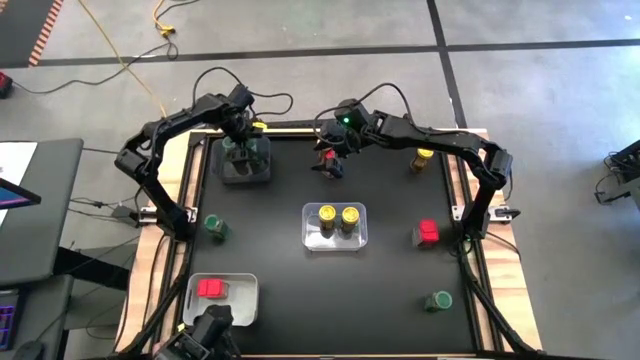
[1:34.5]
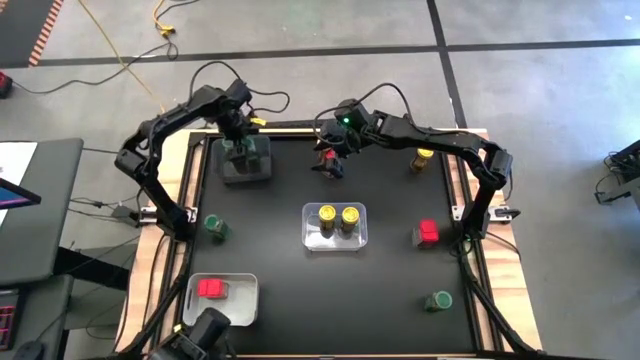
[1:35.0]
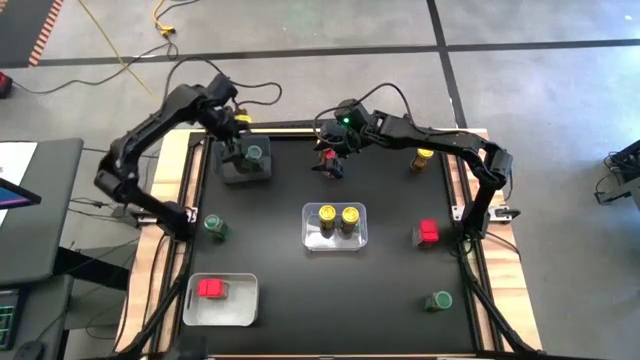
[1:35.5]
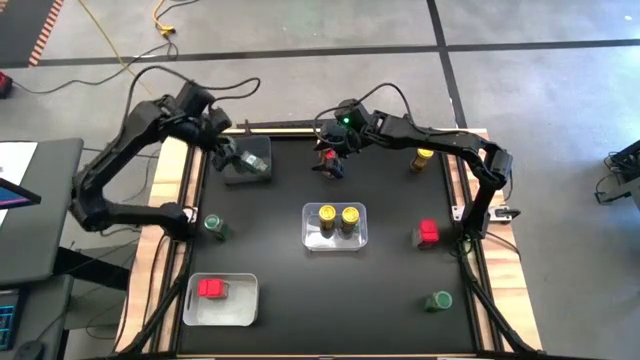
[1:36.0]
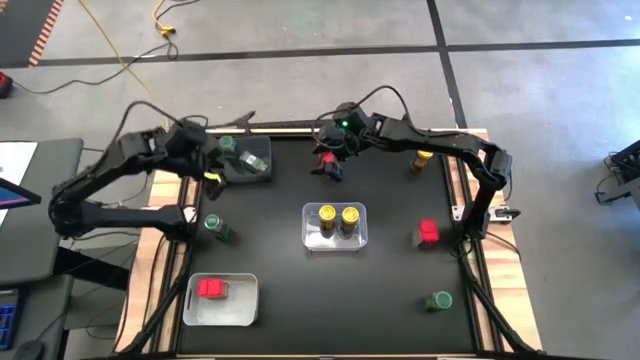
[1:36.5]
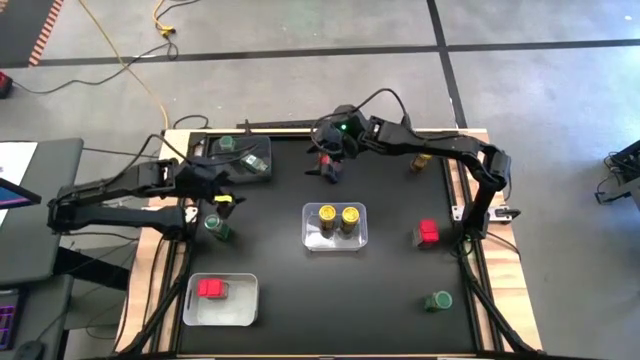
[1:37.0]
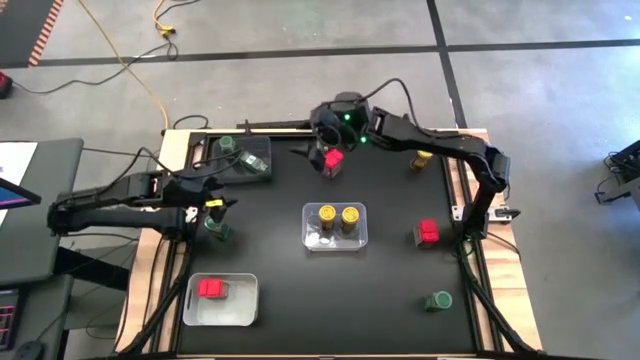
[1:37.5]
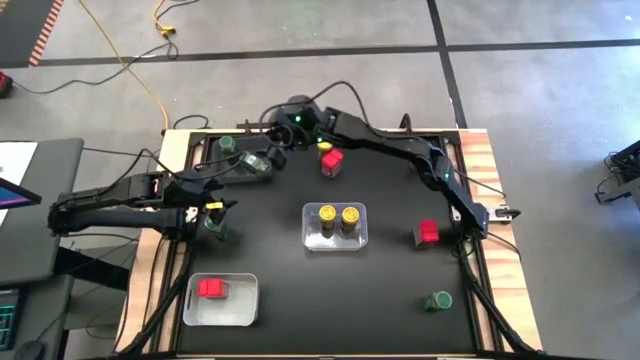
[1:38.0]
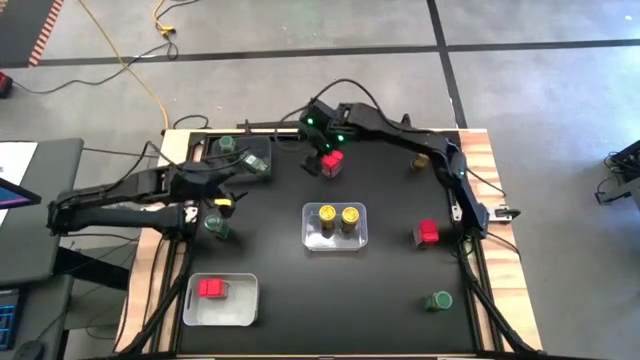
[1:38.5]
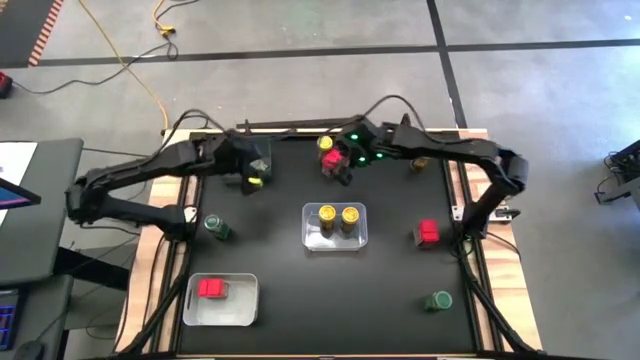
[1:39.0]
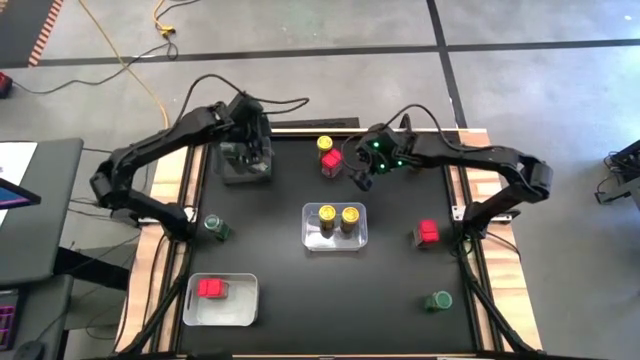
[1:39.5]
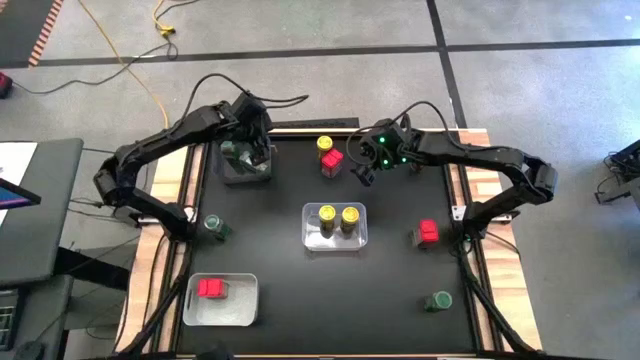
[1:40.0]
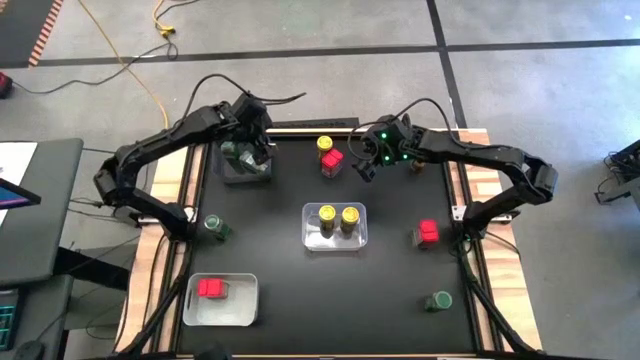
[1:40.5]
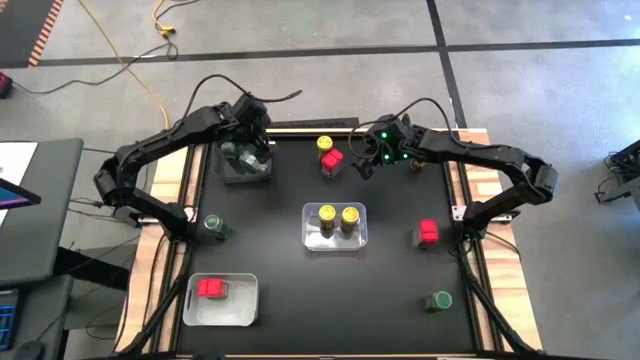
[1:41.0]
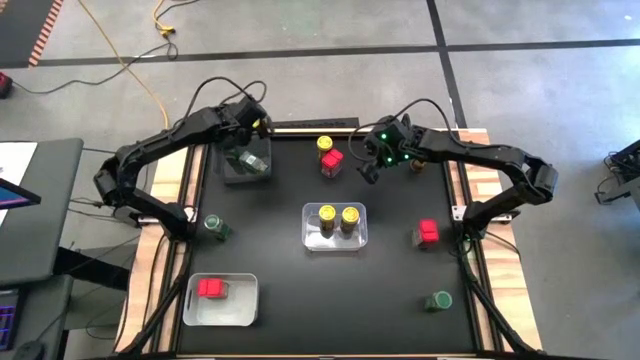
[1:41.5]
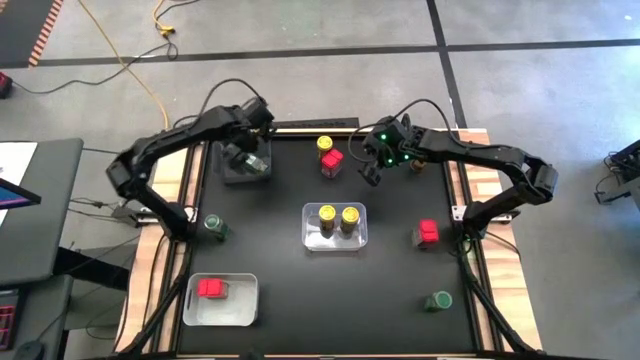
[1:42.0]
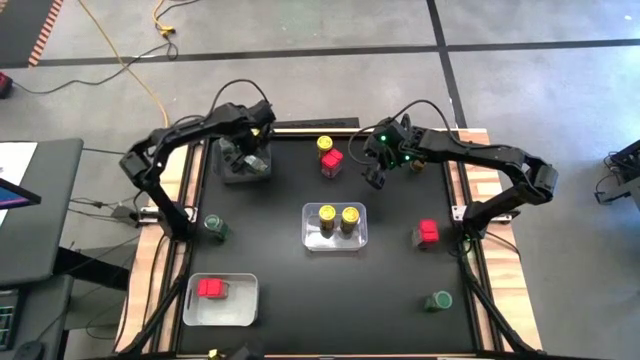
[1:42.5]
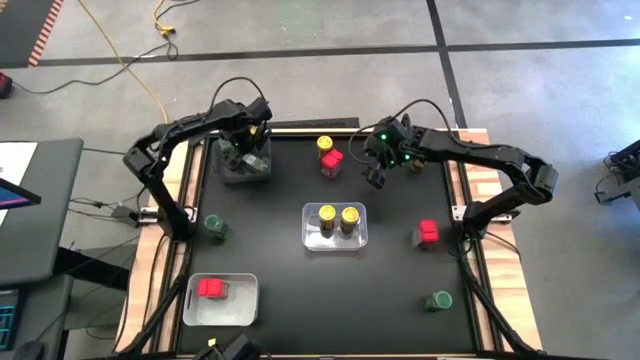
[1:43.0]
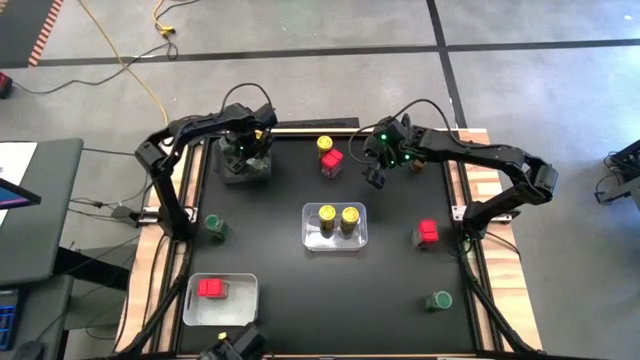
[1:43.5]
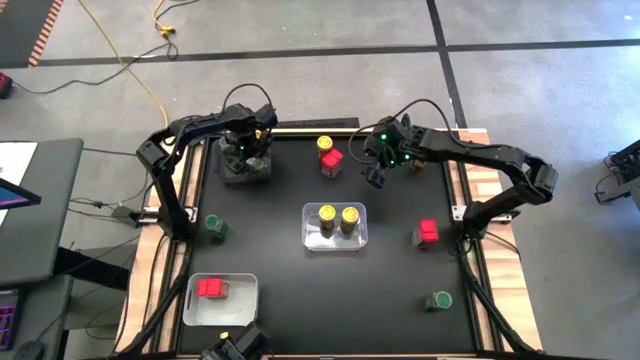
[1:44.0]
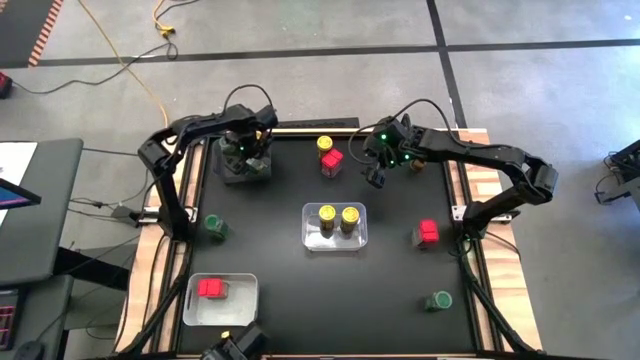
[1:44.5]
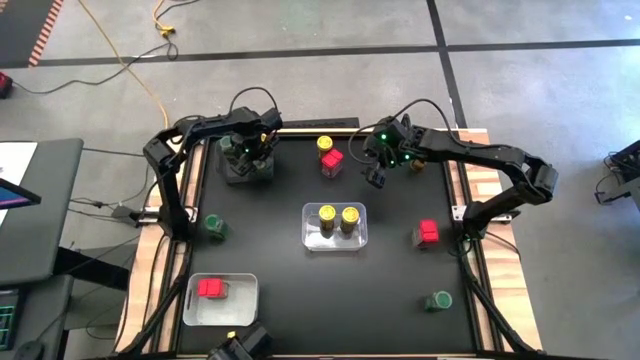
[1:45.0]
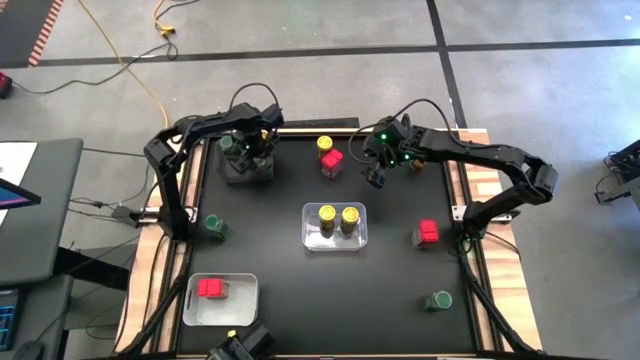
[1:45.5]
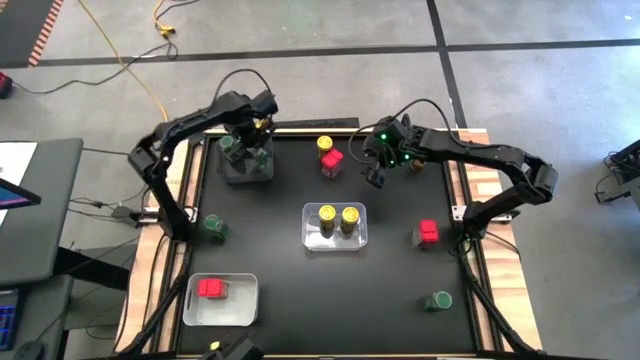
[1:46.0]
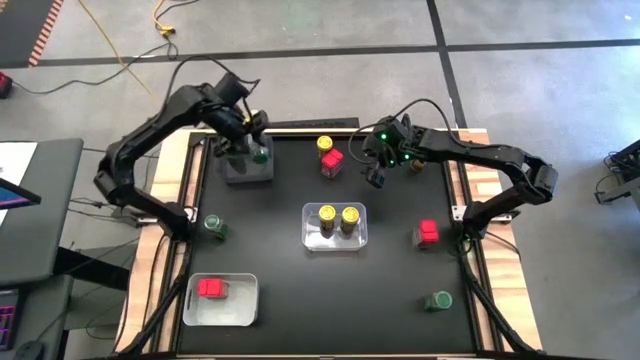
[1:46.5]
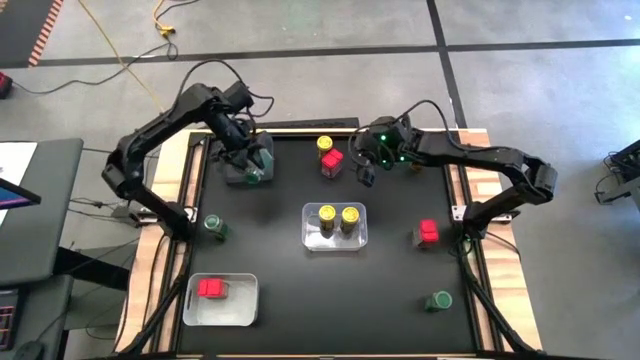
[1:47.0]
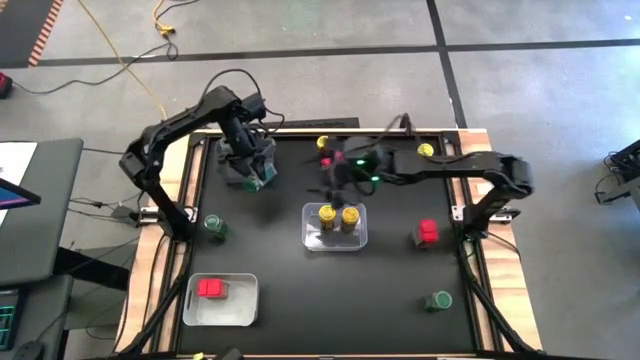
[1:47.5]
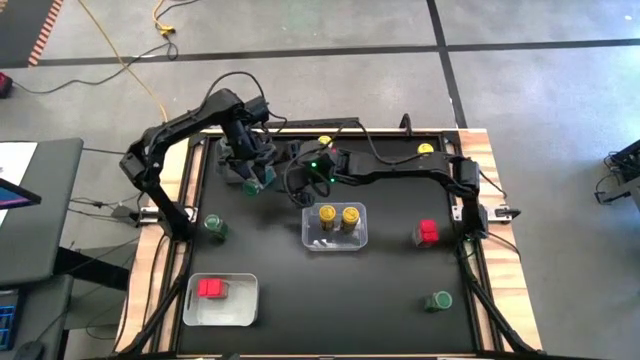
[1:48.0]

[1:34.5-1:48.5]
Task: Sort spices by type
Put the green seasoning bottle into the black bin

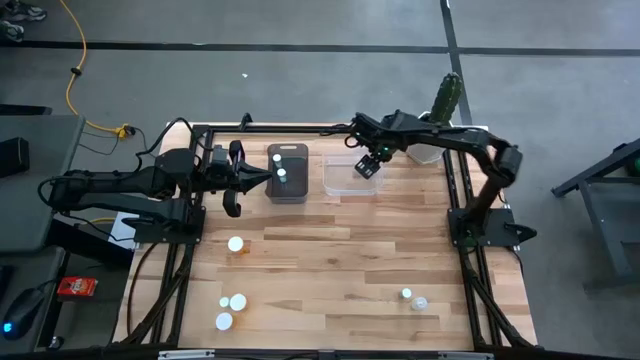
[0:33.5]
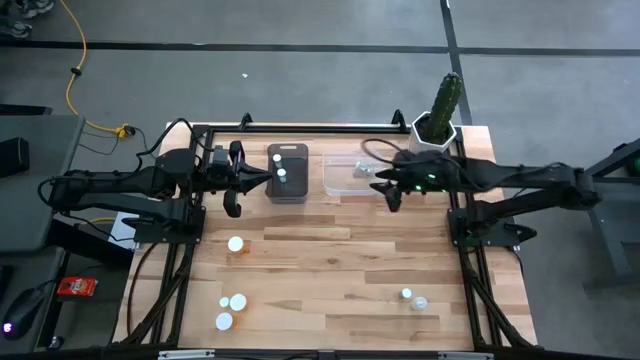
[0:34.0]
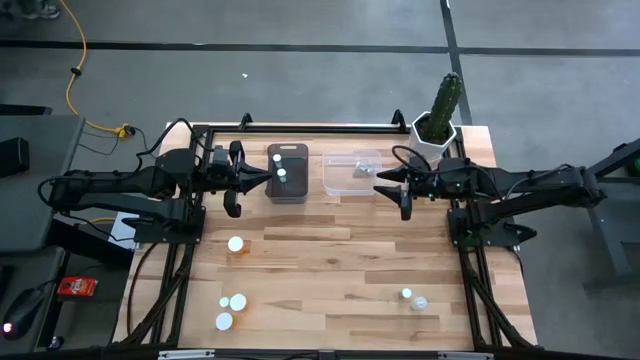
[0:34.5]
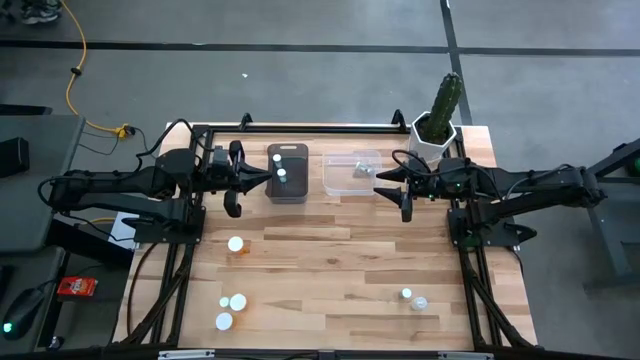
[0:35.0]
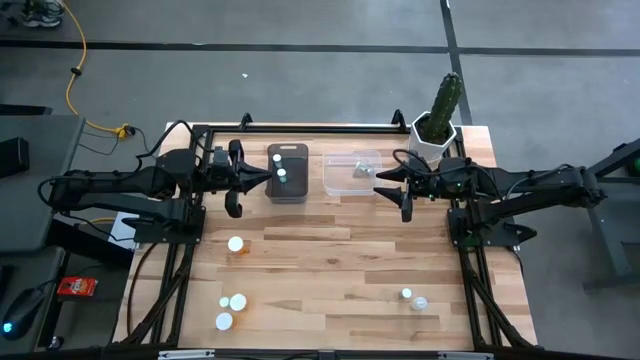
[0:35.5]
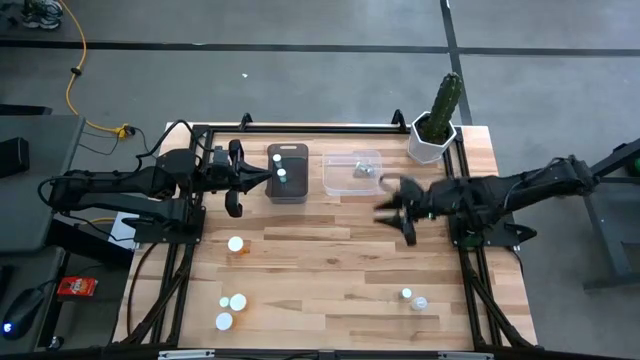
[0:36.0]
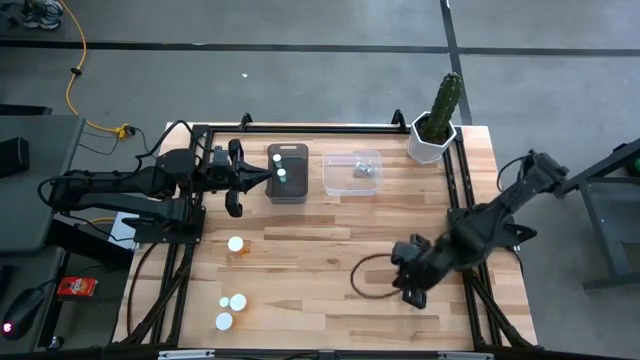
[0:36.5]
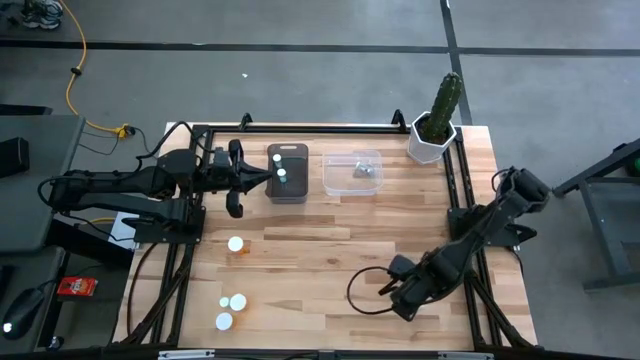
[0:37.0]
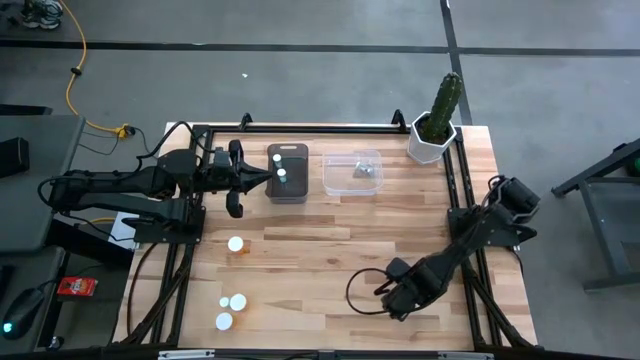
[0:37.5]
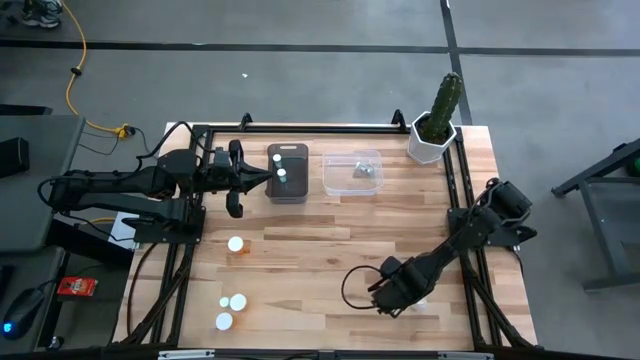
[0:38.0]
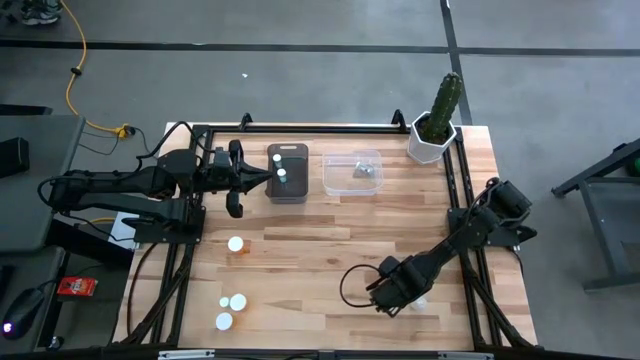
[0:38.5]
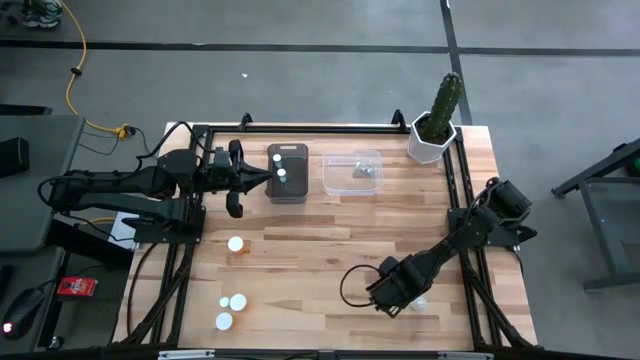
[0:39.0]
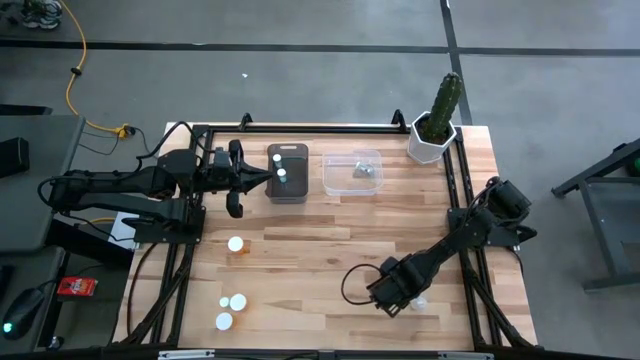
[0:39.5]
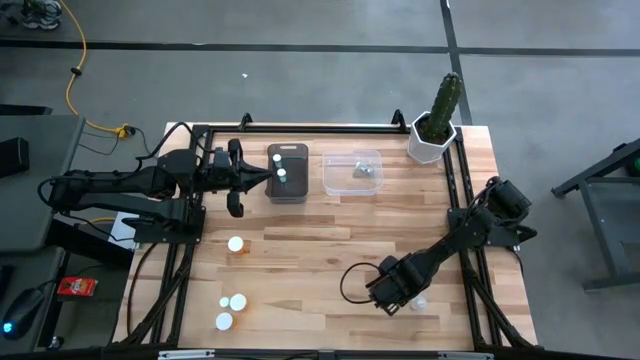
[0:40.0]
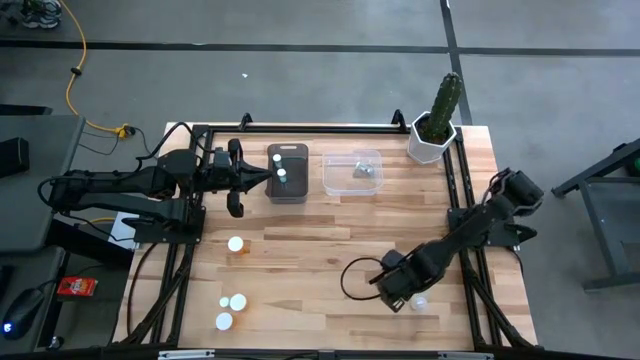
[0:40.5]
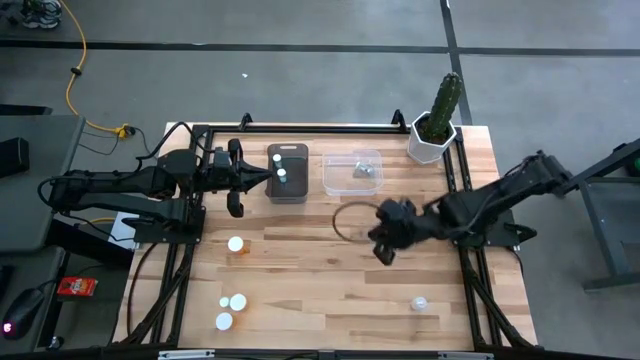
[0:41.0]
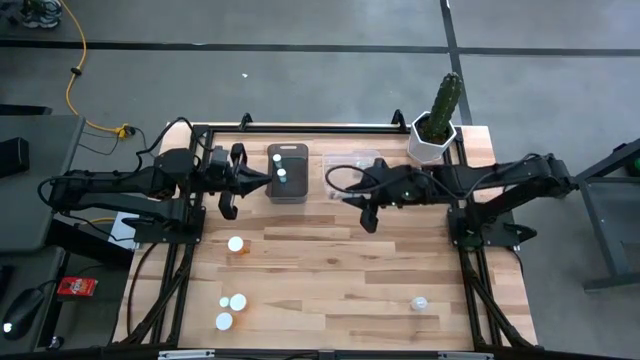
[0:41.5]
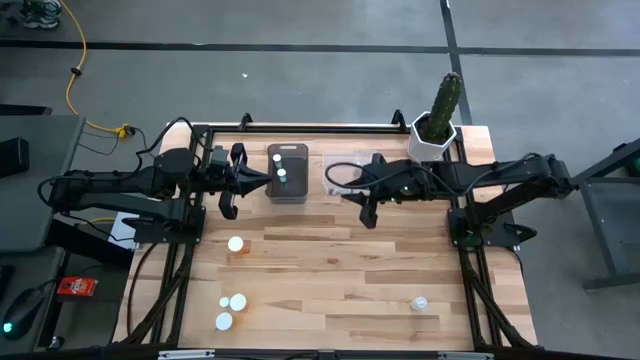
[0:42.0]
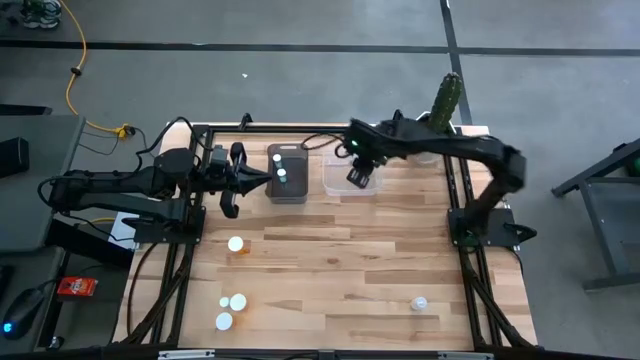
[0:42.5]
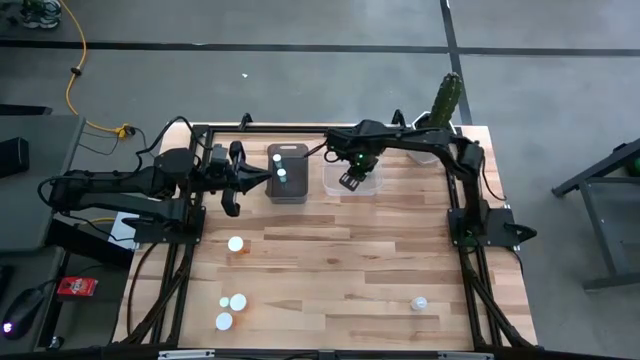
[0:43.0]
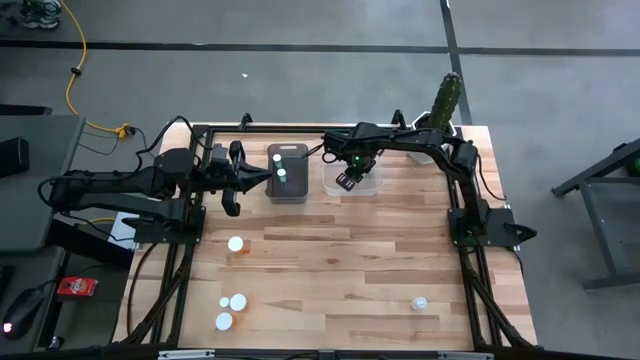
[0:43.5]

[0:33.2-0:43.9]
Task: Pick and place medicine bottles into bin by pill shape (circle, oval)
Put the blue capsule bottle into the transparent bin
